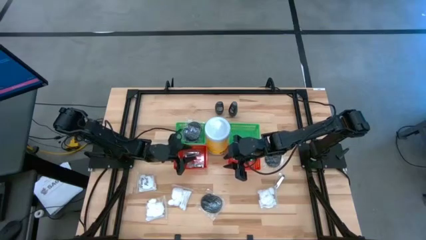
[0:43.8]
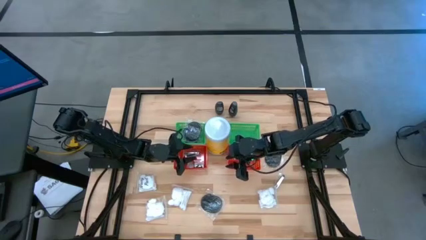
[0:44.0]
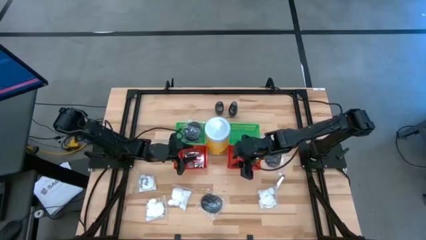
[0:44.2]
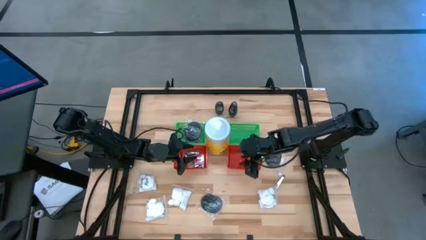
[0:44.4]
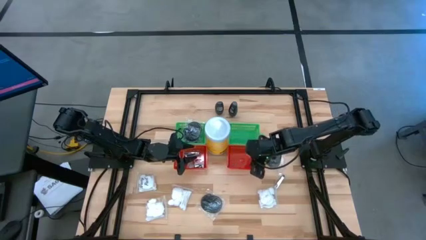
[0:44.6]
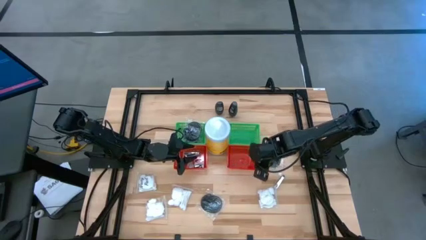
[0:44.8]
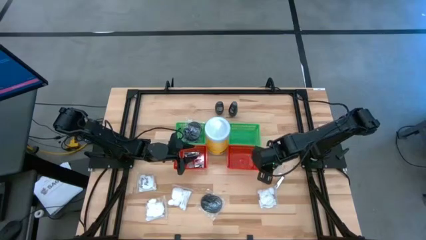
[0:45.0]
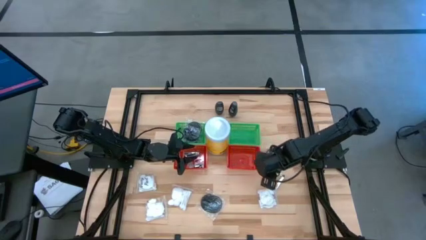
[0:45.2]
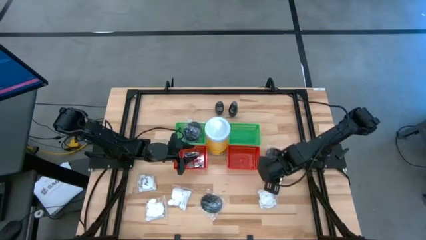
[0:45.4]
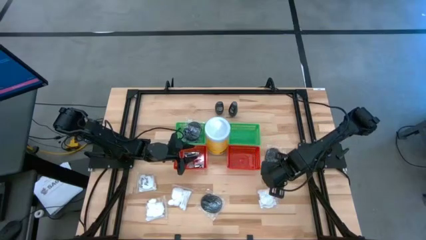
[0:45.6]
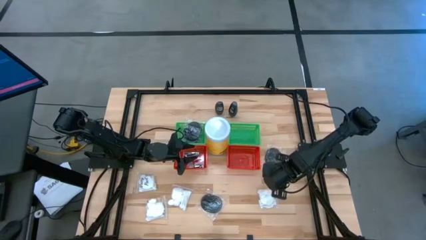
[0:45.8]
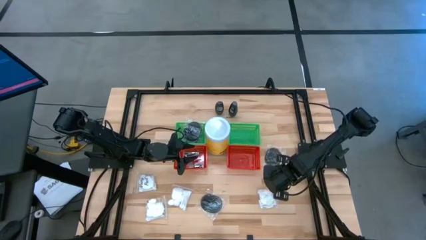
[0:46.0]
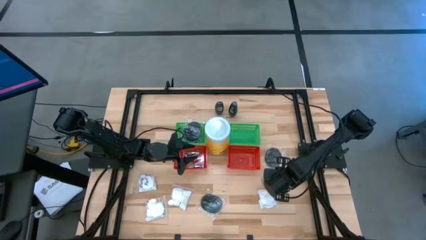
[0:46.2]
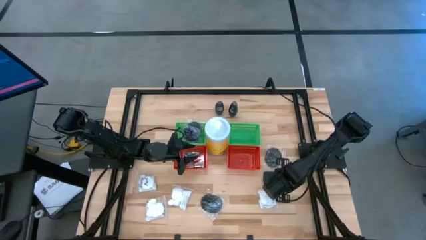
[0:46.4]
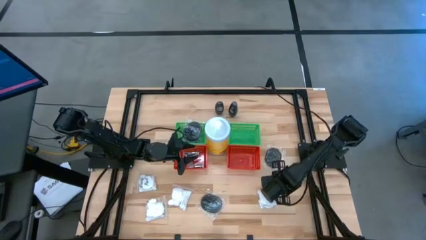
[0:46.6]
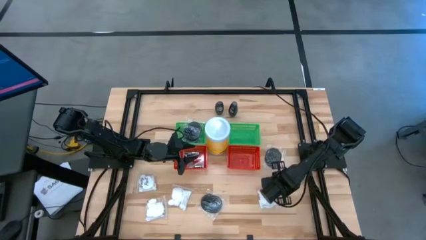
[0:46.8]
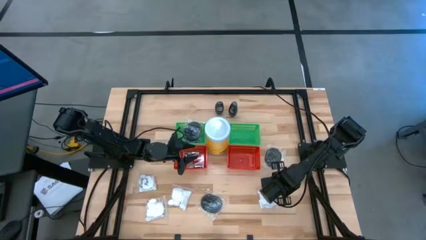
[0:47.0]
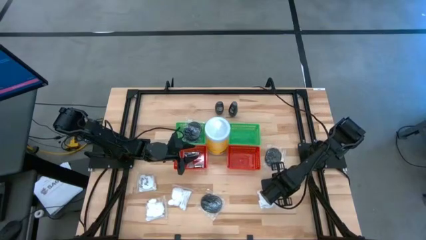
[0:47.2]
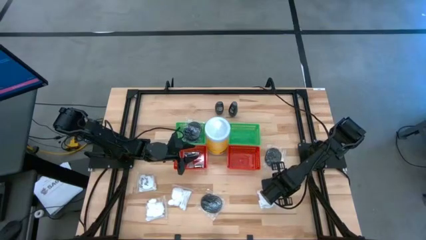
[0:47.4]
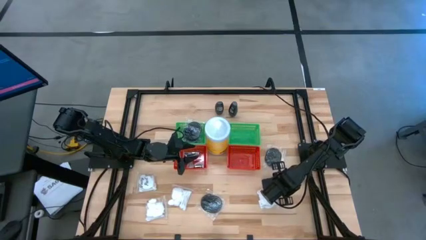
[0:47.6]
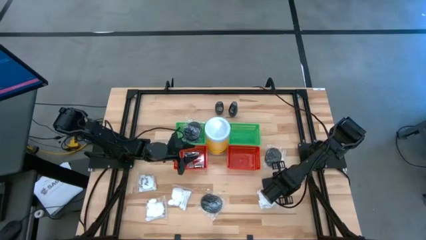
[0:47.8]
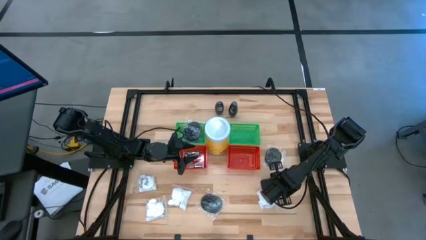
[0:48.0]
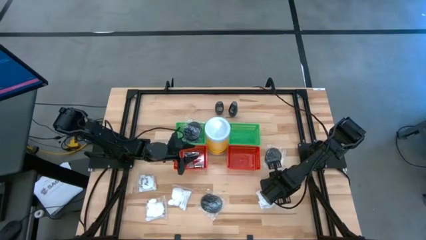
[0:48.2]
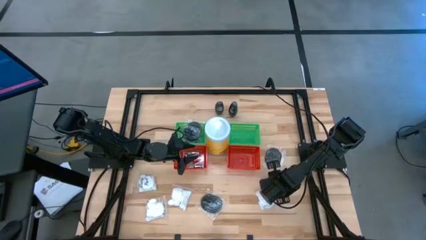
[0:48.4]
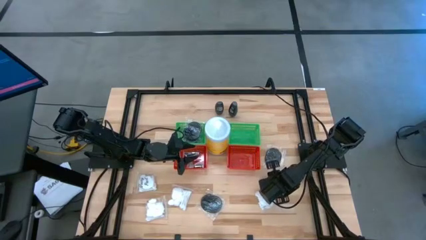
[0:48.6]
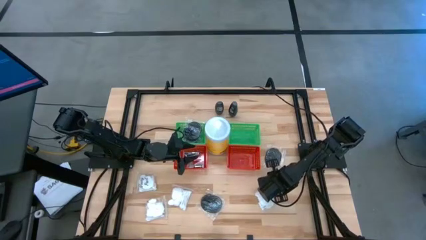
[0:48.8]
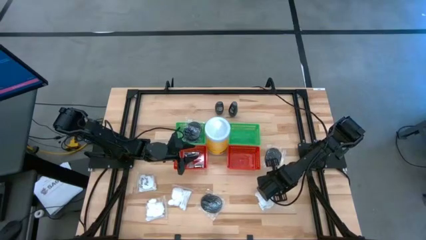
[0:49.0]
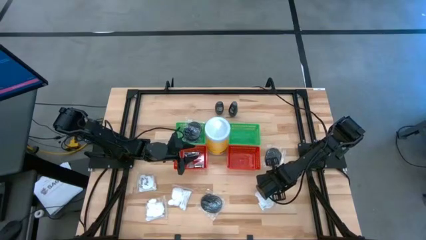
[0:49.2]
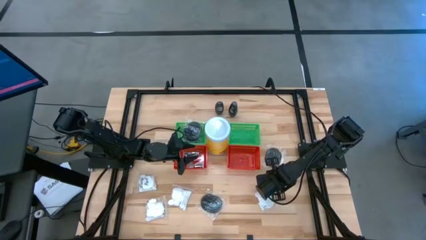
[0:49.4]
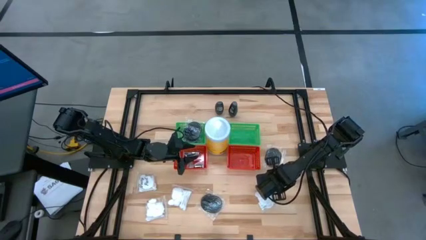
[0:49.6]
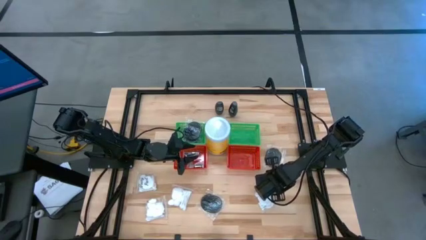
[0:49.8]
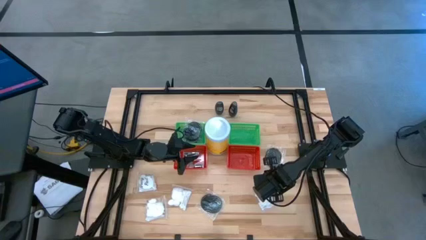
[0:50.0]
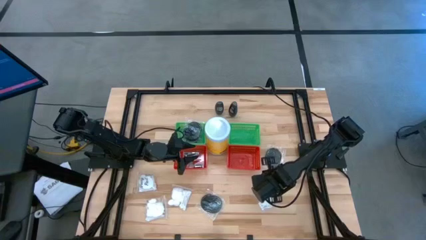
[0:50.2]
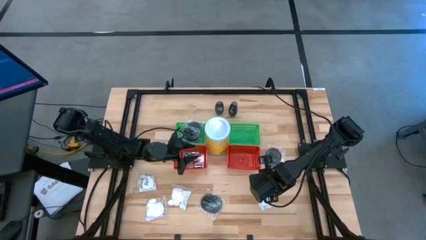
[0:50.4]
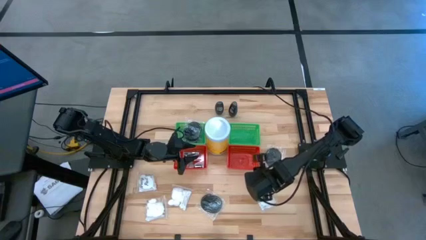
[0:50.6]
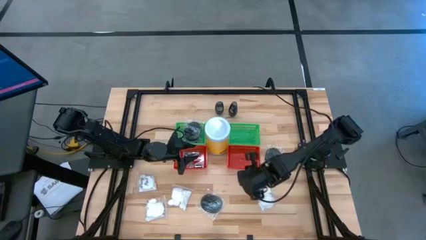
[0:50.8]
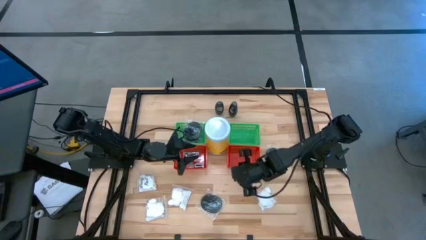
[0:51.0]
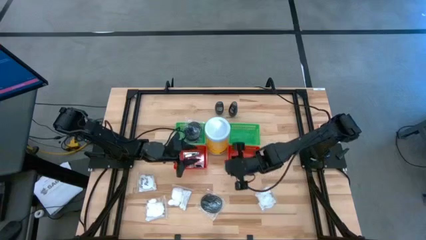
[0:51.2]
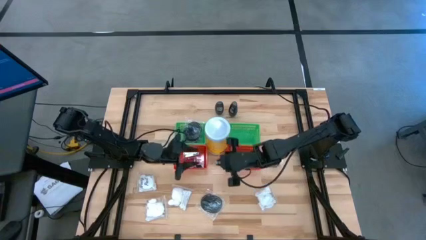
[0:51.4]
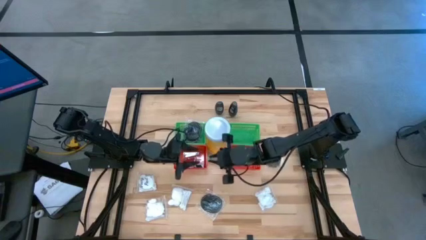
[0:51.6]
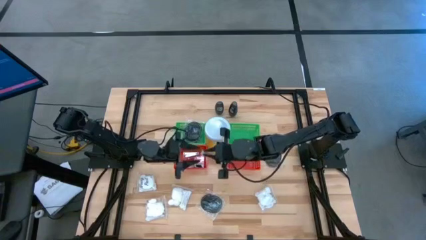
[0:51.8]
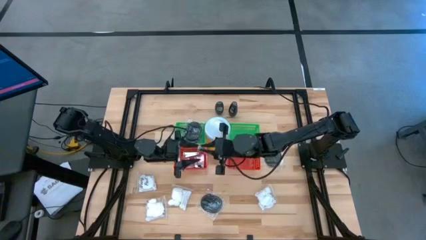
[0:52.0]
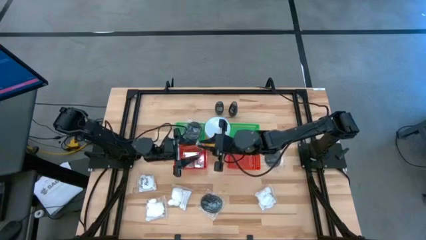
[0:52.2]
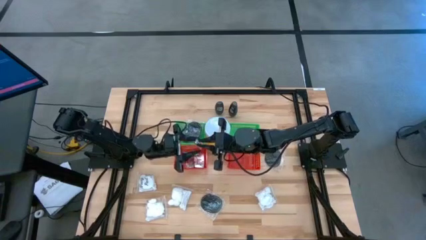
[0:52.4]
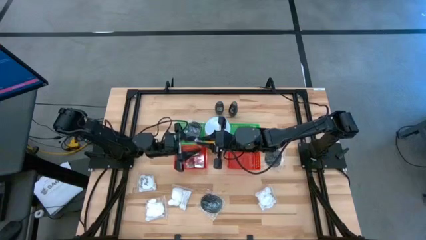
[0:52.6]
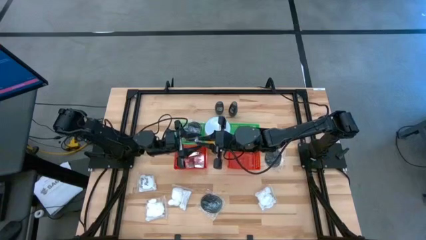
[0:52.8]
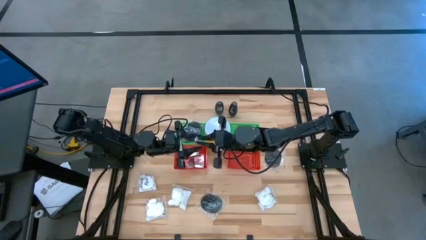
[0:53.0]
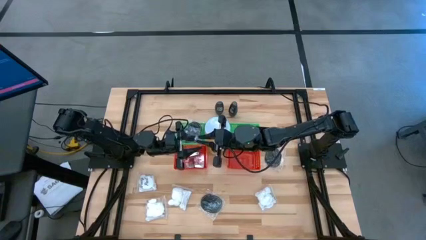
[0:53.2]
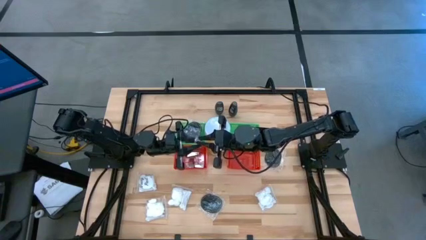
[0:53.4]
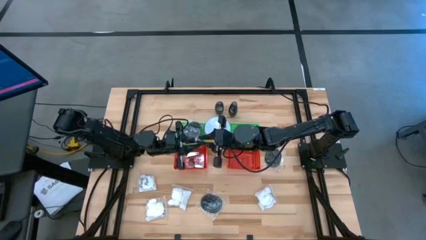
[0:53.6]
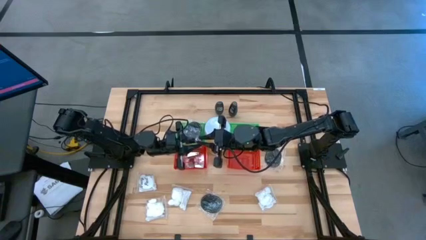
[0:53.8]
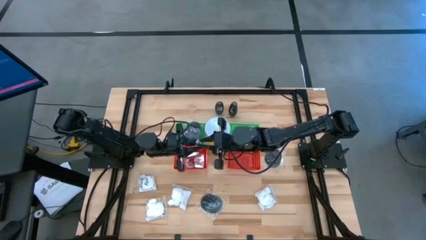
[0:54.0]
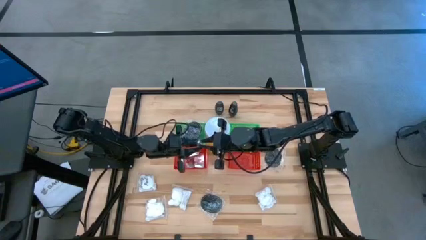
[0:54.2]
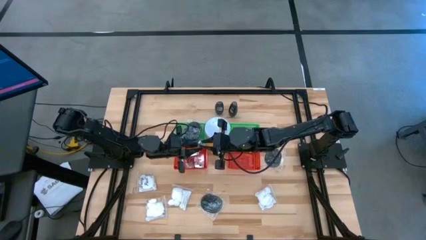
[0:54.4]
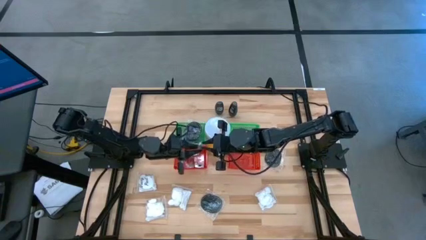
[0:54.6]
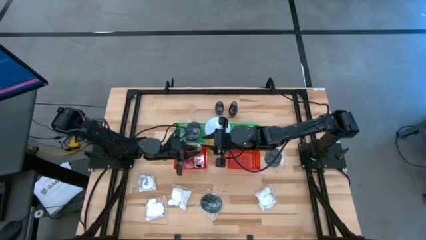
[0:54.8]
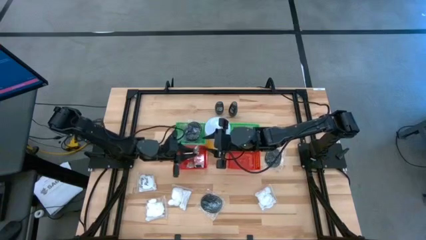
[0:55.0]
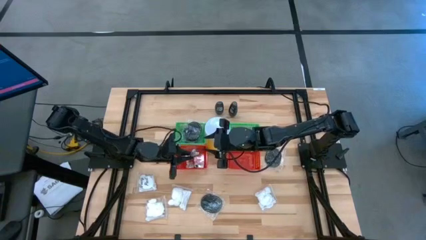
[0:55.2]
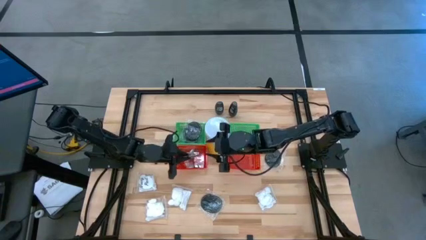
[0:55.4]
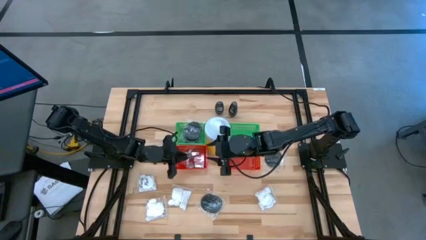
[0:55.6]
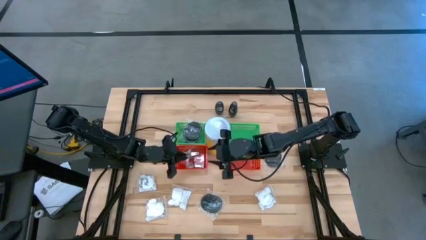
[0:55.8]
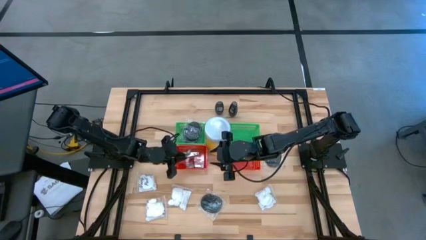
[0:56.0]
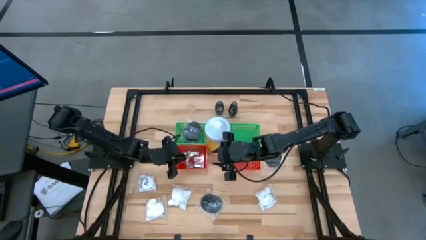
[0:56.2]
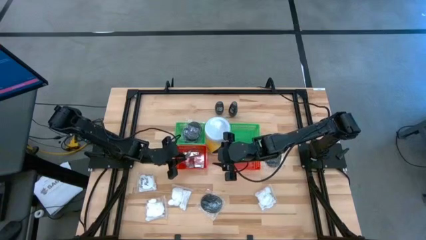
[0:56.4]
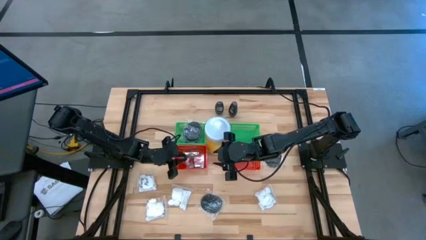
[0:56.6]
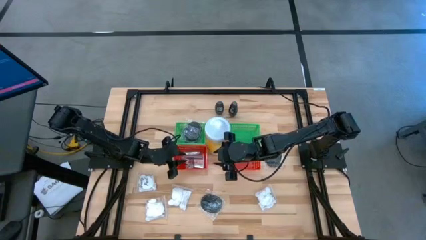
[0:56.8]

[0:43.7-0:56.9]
Task: Pick & Place Travel size toiletries
Put the nail cutter into the left red basket
